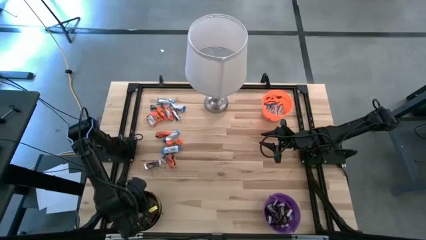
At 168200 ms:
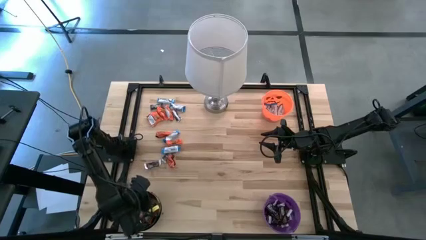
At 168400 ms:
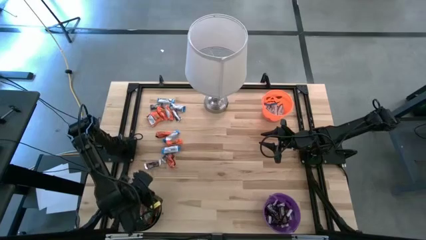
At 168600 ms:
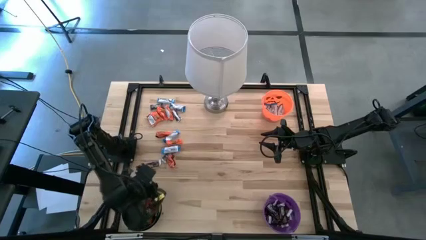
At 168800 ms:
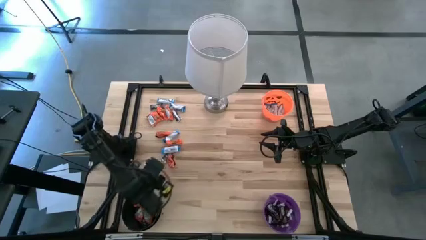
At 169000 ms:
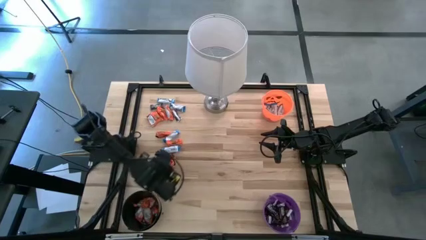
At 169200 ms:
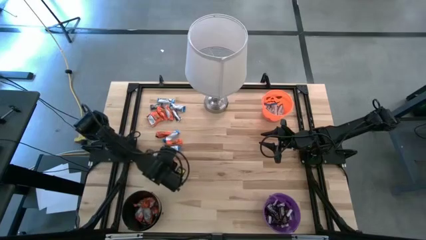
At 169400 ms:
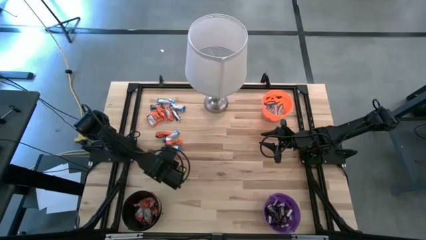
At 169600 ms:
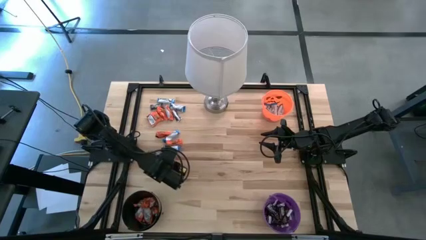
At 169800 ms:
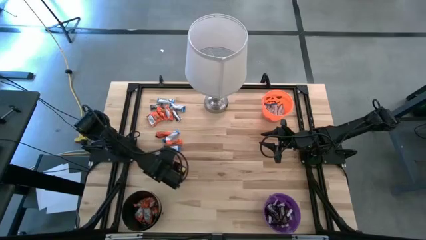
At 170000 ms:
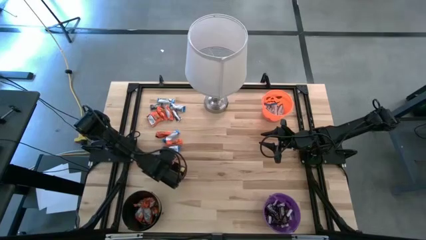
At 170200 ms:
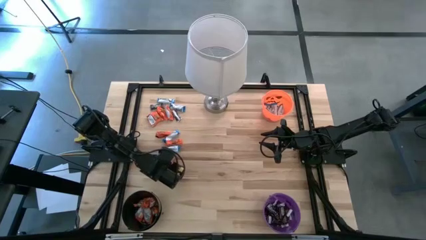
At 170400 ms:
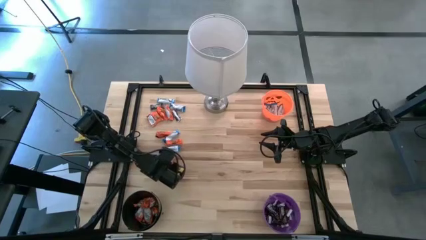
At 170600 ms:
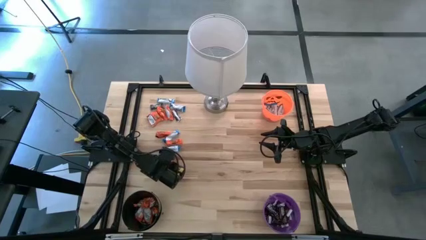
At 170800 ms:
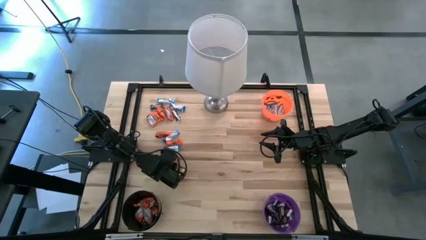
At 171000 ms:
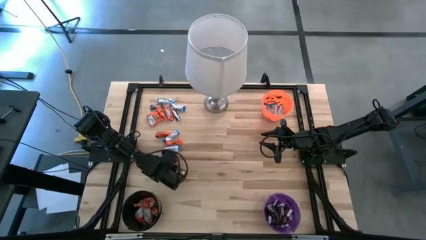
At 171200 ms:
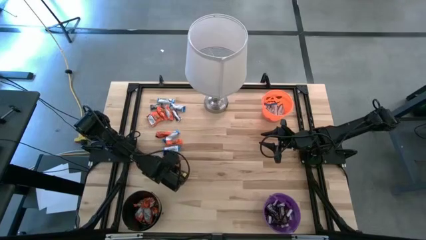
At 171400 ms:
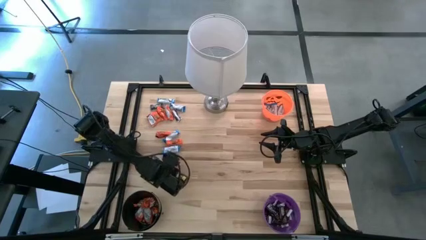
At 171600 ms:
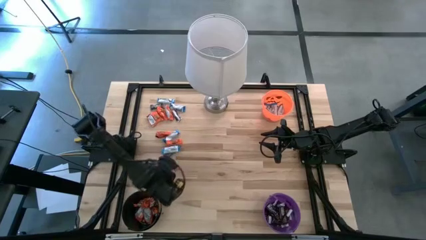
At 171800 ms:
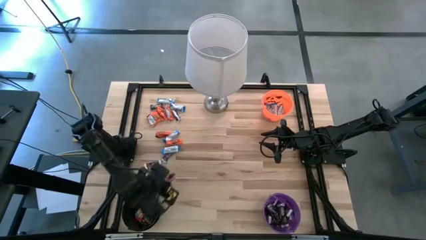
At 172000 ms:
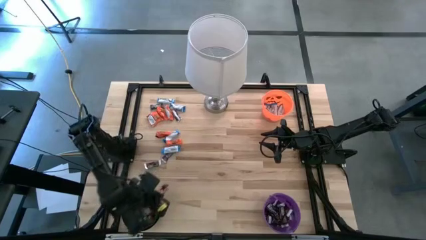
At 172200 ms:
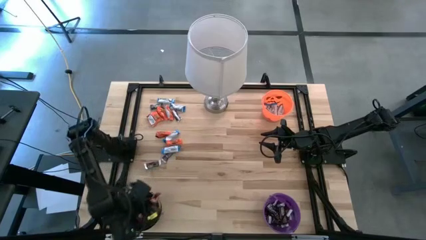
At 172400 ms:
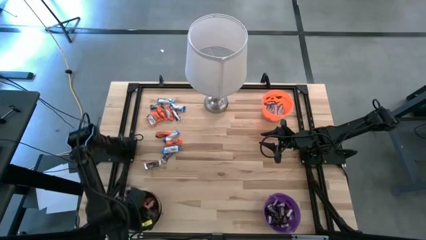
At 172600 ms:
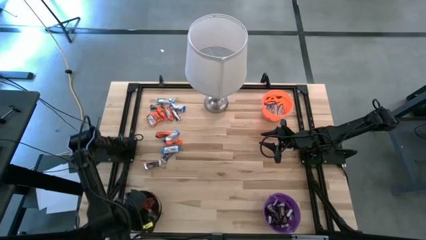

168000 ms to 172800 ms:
Task: Sort candy
Put the orange chocolate bar into the black bucket

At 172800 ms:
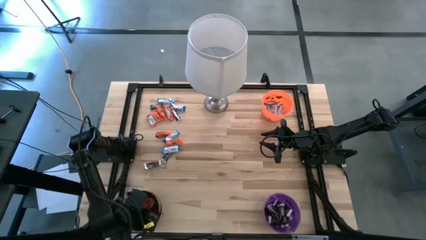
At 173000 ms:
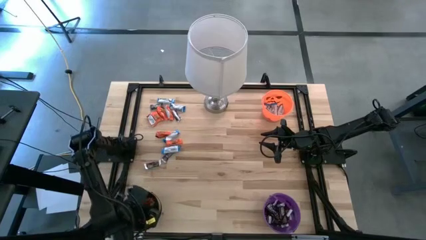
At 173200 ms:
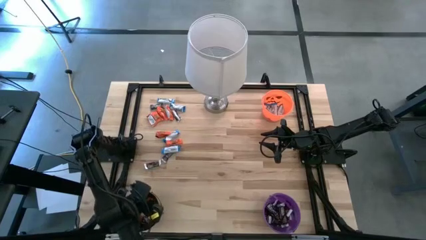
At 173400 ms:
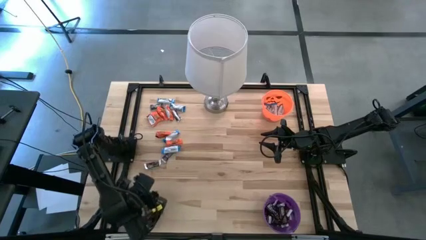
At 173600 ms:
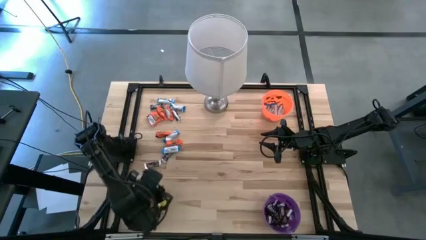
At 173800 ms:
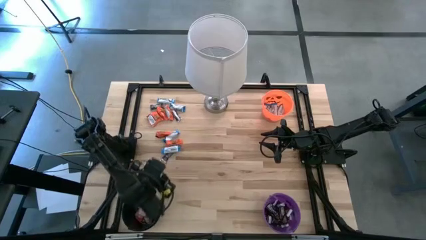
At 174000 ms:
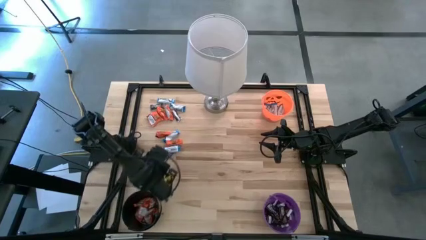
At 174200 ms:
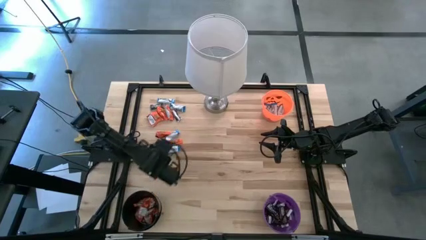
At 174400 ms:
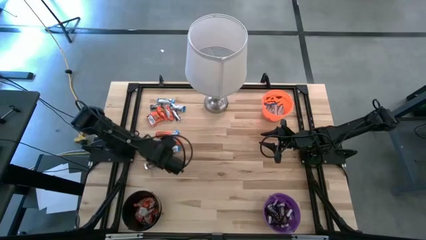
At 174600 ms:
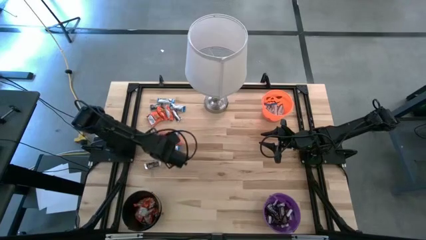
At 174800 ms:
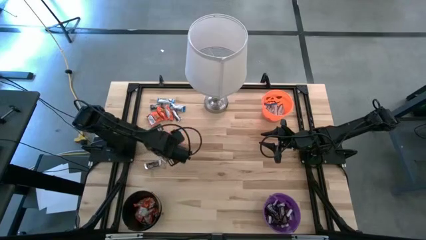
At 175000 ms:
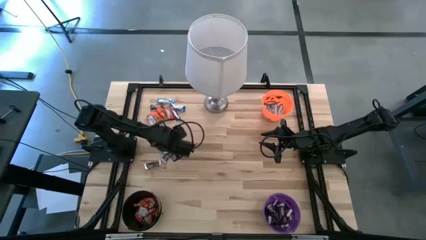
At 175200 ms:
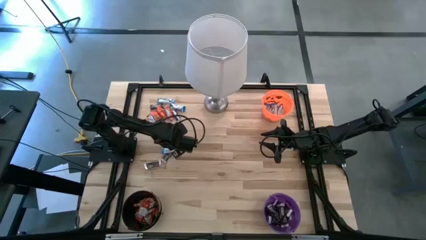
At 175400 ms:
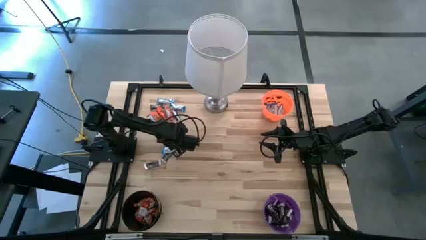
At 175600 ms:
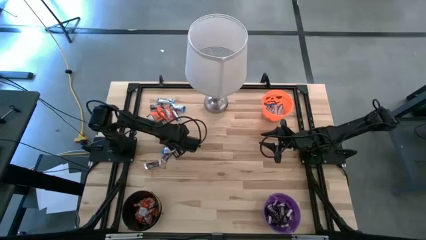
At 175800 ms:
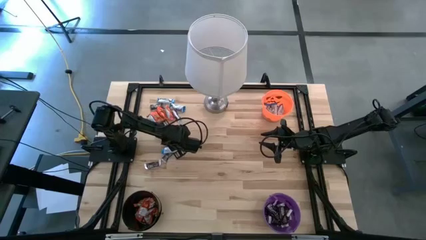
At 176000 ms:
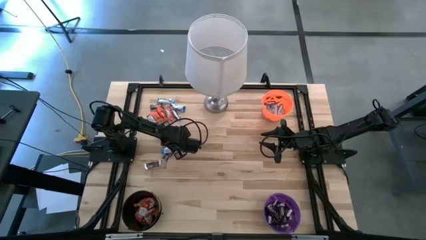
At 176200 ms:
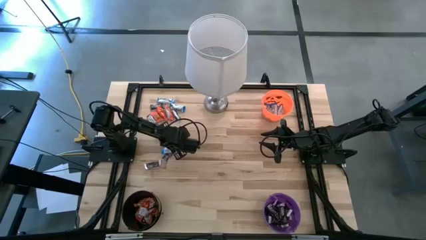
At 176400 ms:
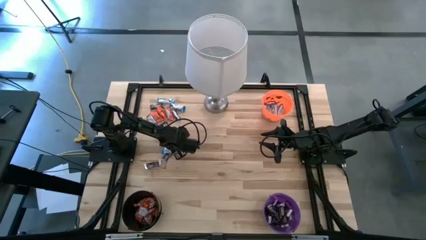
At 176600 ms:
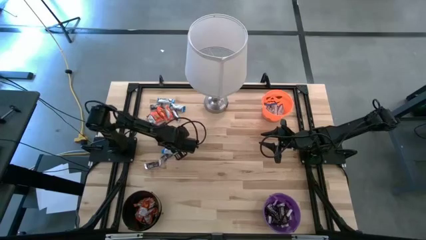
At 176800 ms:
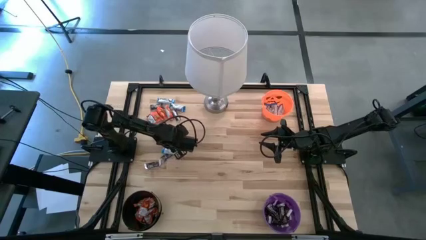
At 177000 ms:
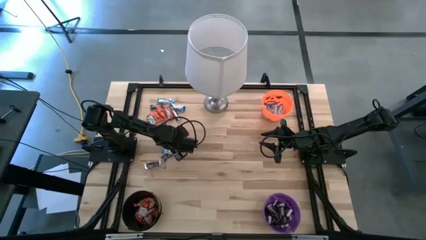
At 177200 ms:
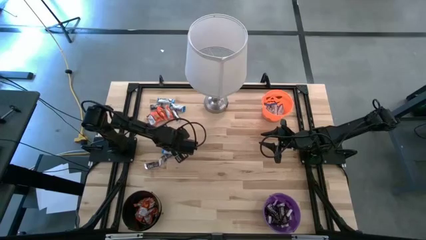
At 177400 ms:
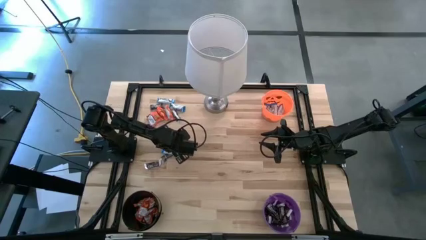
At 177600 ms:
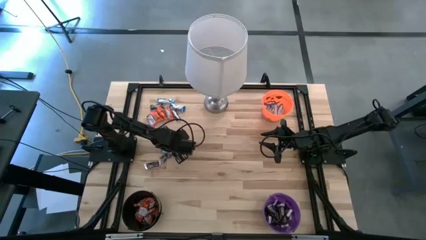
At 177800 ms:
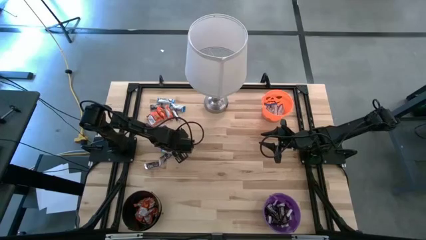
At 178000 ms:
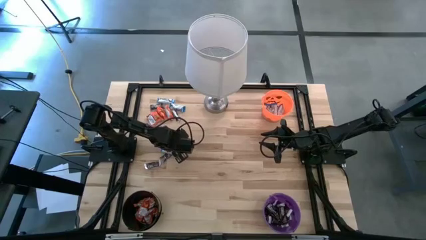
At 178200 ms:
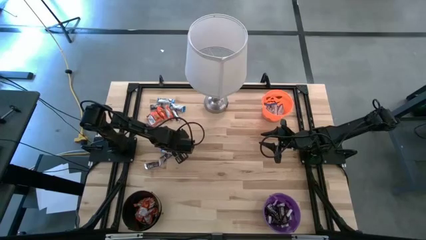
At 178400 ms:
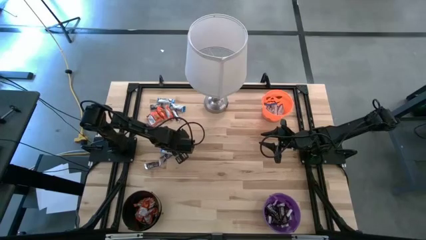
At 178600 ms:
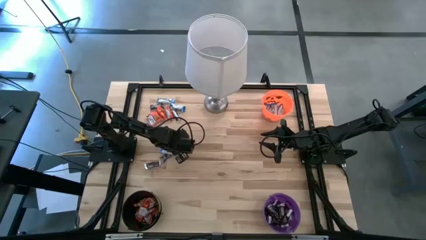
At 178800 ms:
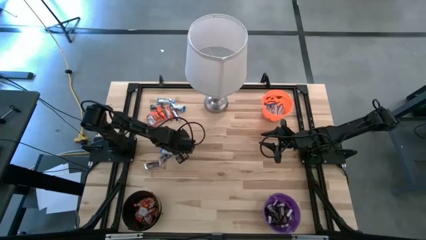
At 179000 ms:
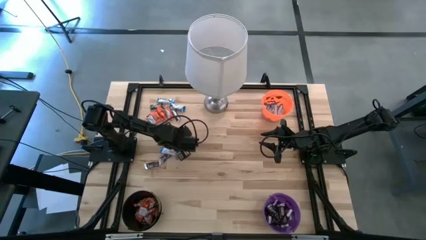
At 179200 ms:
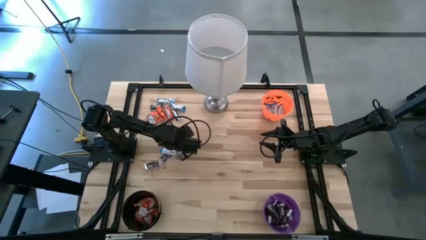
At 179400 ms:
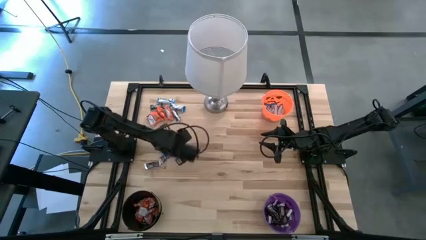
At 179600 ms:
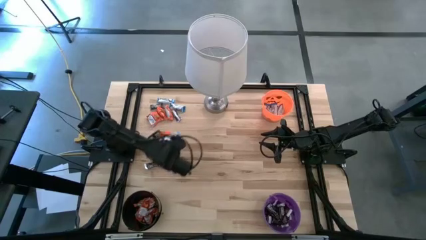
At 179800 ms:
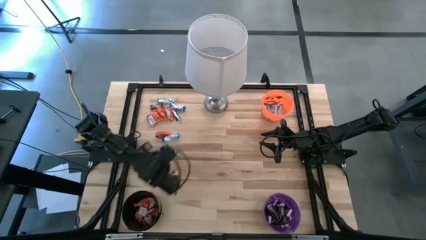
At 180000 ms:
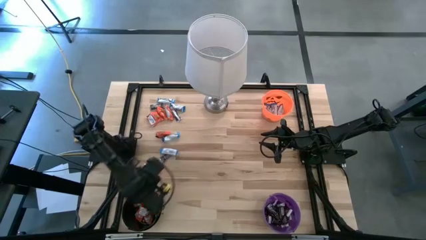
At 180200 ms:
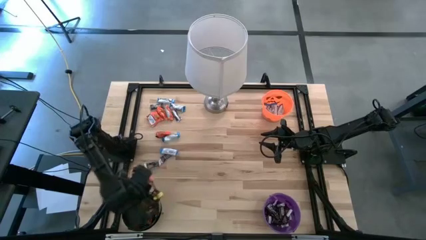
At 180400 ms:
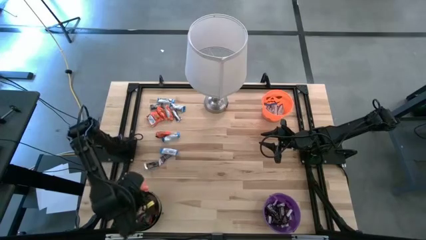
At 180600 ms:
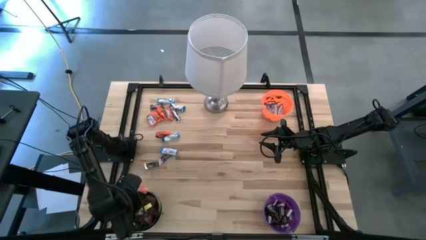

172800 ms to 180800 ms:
Put the orange chocolate bar into the black bucket

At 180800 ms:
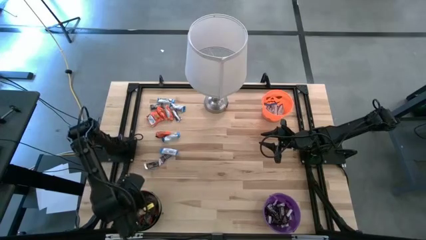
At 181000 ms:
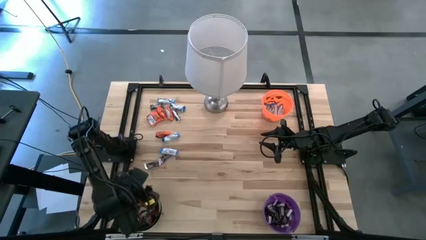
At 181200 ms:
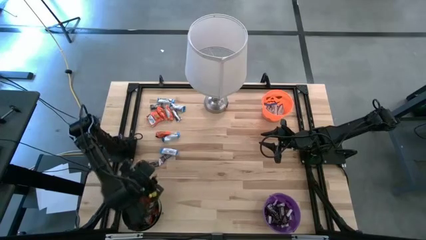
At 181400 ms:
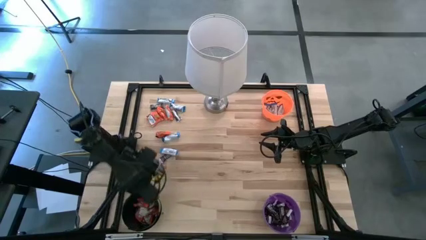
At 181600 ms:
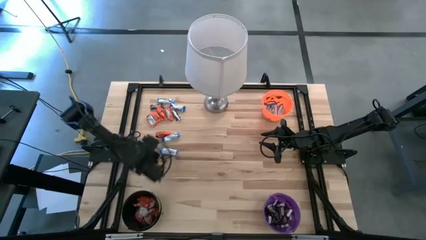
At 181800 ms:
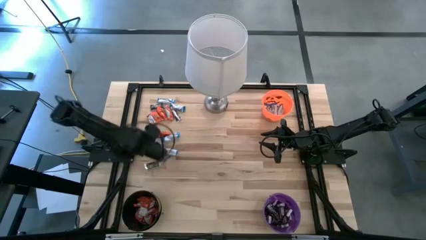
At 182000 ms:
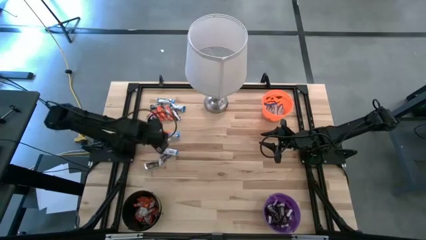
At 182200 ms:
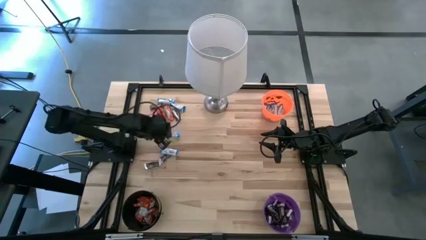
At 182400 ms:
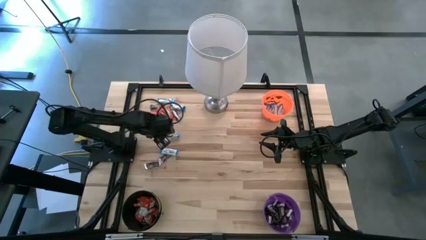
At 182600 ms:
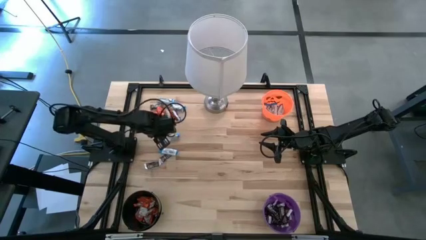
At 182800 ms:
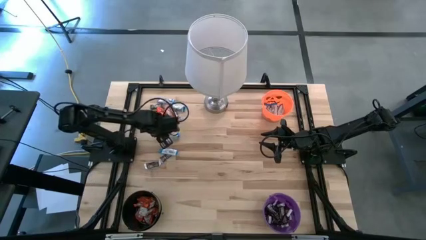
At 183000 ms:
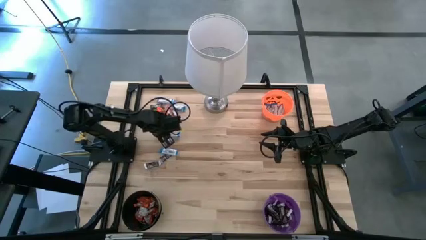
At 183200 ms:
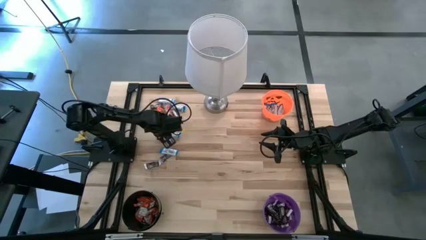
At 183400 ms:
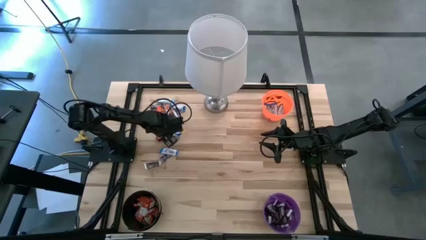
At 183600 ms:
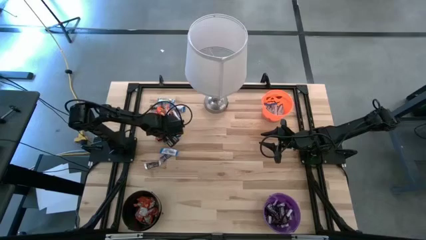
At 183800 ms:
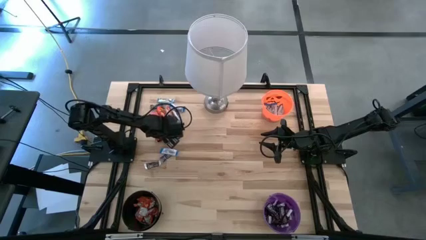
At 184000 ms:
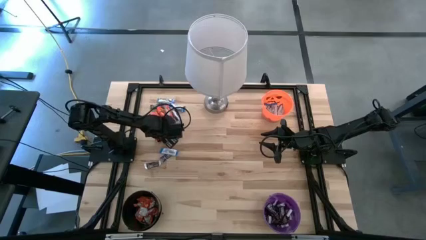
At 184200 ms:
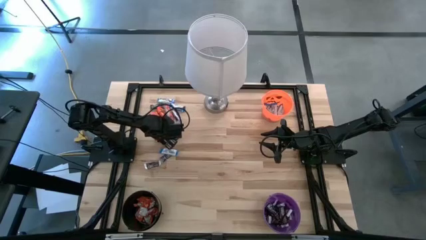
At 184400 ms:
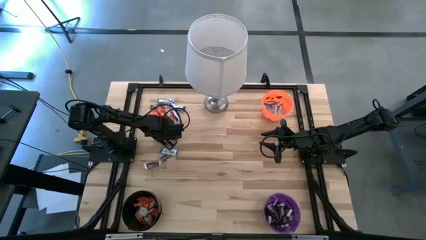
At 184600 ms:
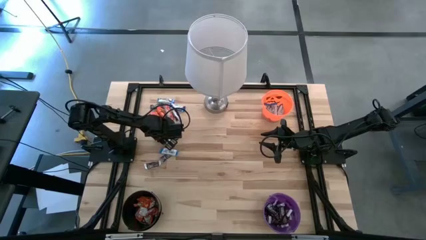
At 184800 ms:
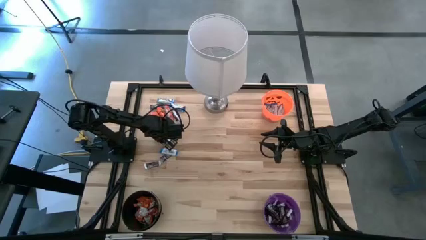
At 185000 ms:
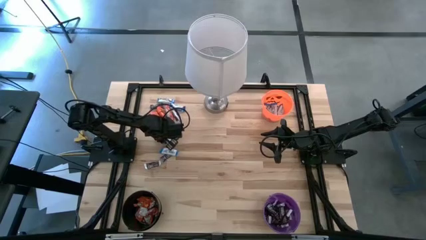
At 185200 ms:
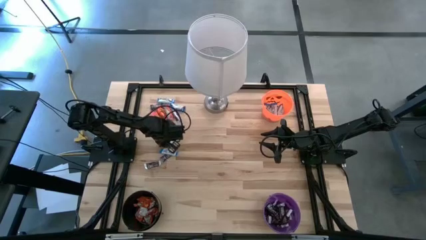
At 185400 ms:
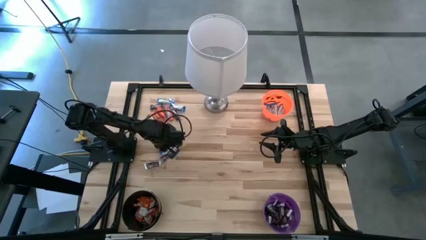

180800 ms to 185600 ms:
Put the orange chocolate bar into the black bucket
